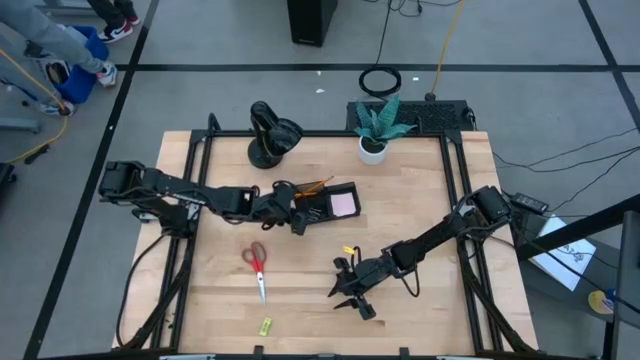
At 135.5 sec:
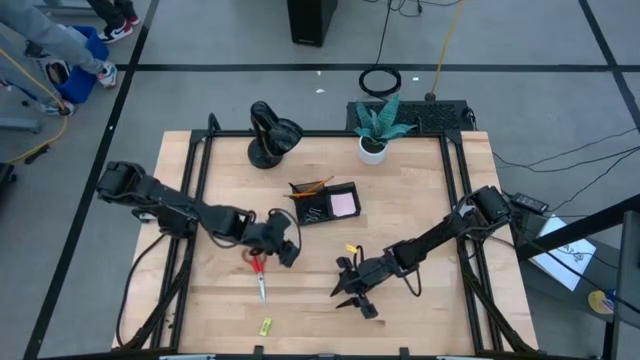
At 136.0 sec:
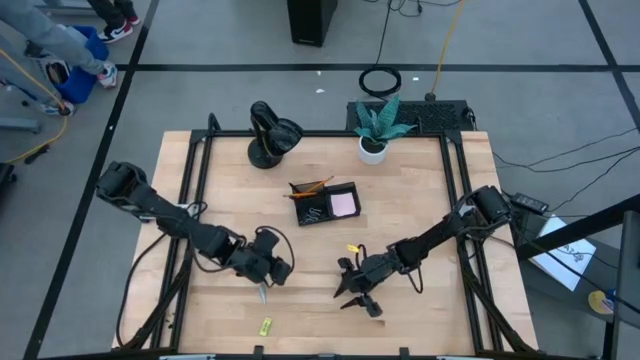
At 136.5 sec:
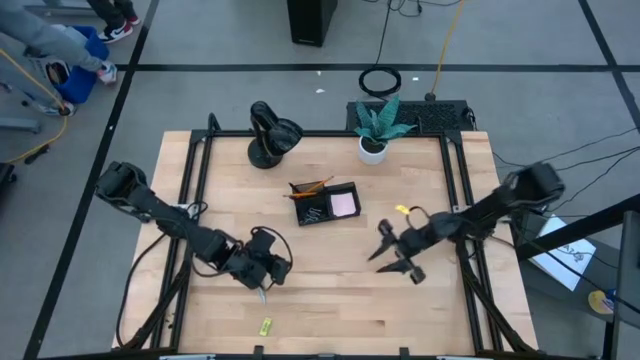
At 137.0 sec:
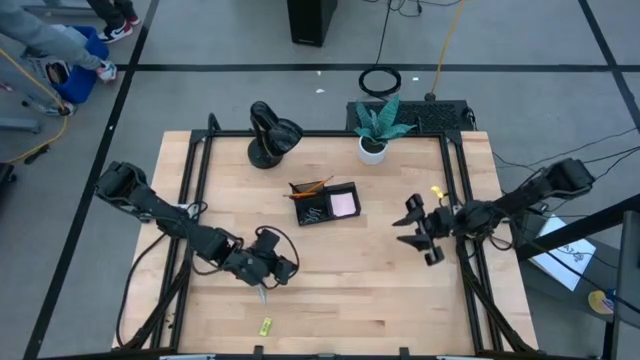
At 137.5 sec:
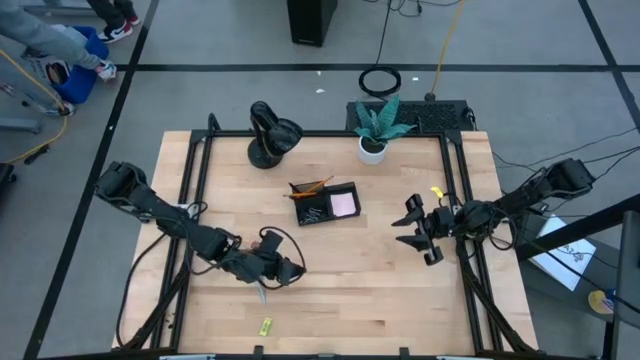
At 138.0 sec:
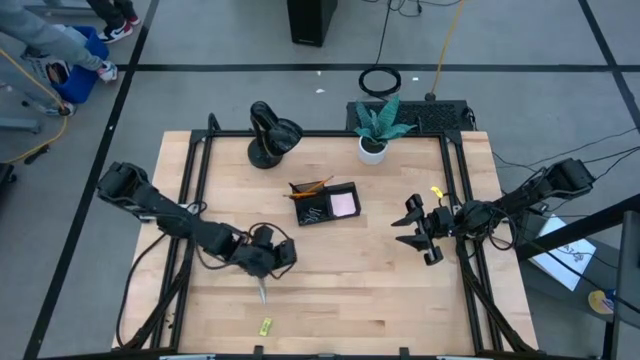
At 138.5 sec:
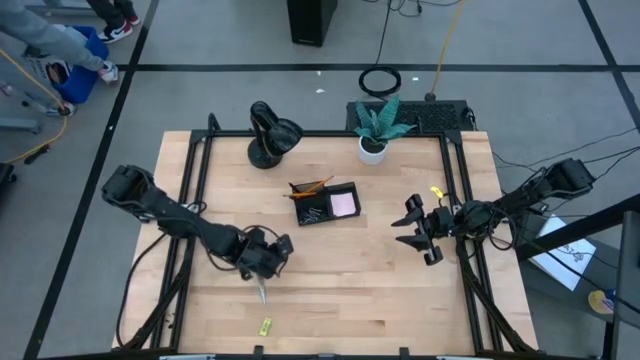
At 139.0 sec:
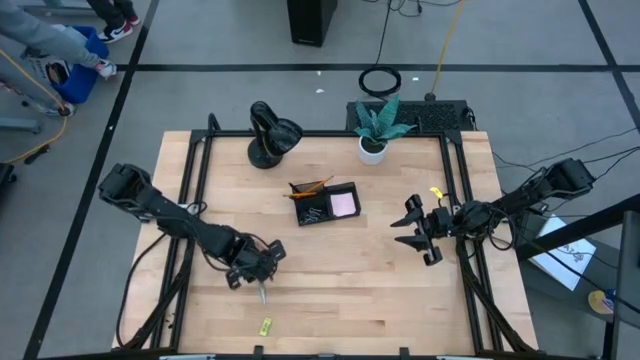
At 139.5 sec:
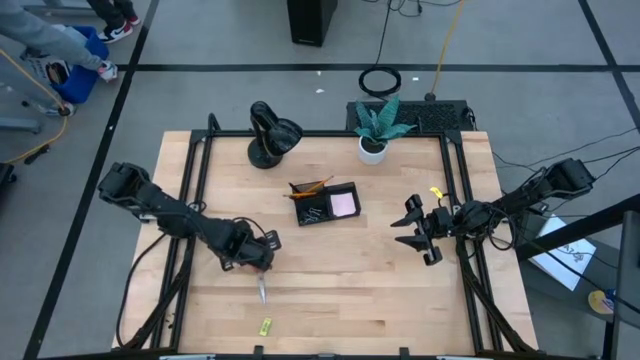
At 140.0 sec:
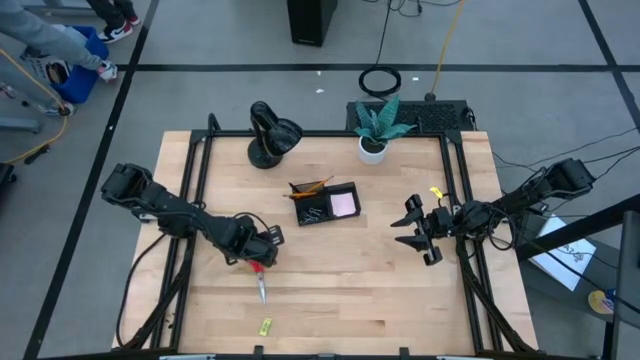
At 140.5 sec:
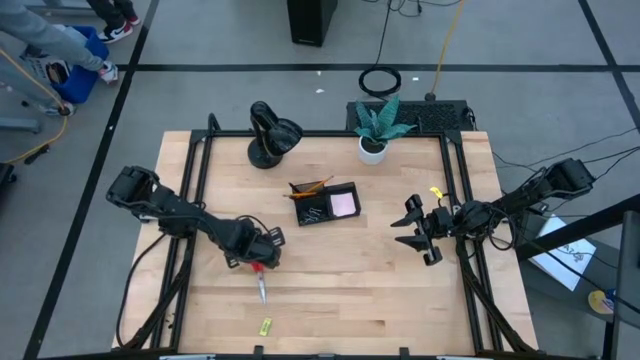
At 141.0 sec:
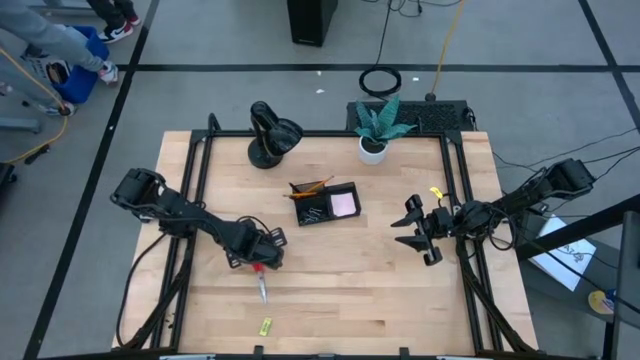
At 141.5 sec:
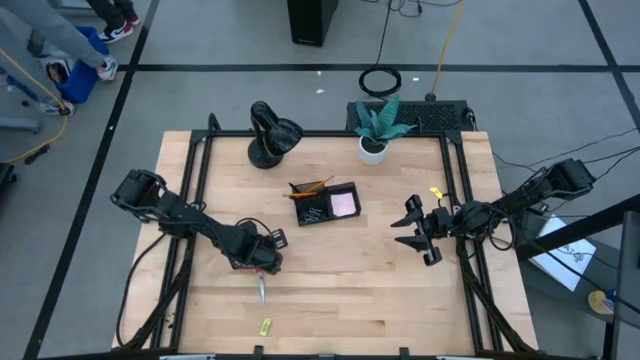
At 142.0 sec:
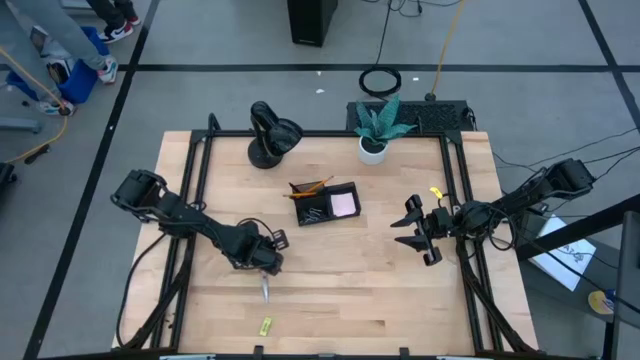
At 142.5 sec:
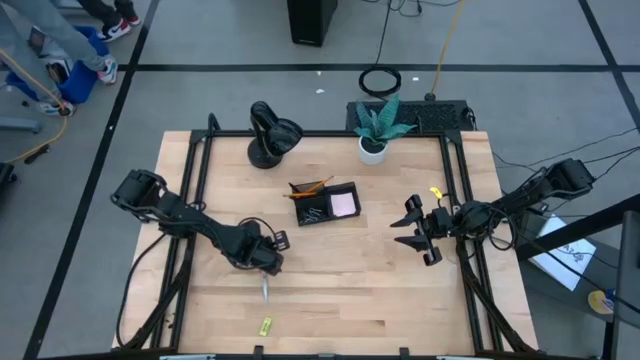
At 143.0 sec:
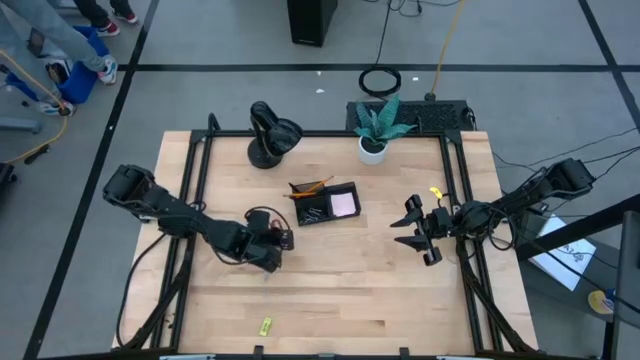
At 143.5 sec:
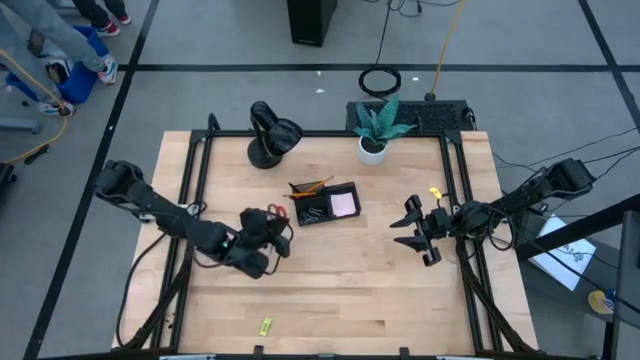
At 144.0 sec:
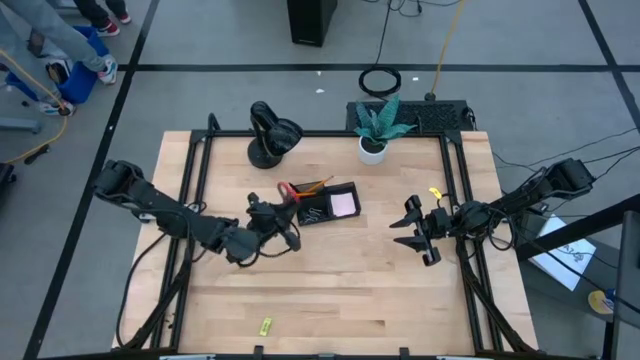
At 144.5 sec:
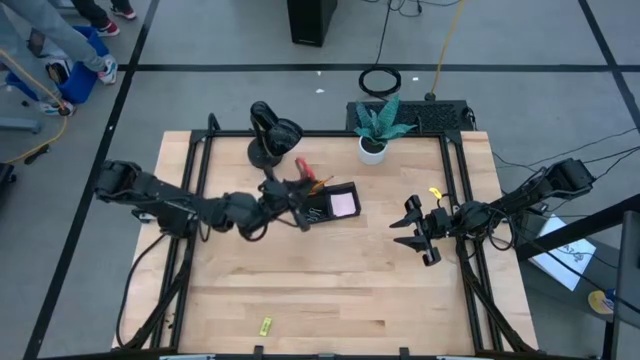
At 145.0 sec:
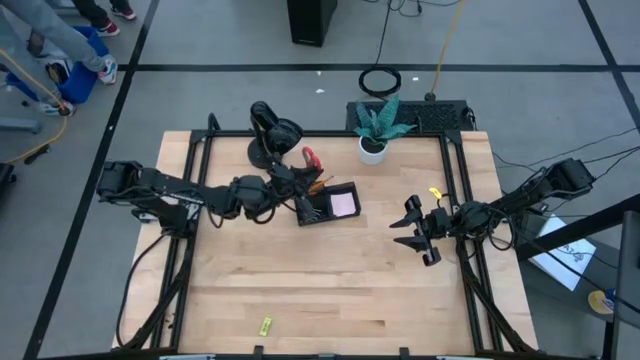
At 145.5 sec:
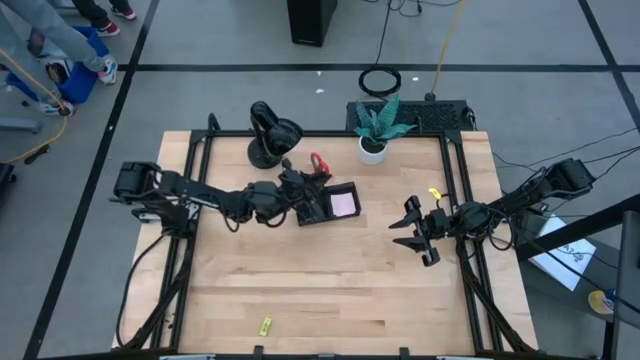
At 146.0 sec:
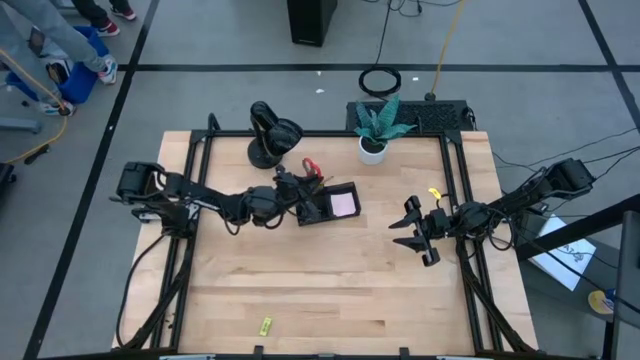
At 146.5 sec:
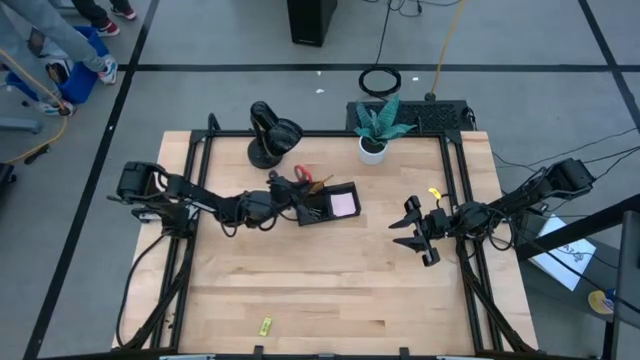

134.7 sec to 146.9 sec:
Task: Pick and place office supplies into organizer
Put the red scissors into the desk organizer

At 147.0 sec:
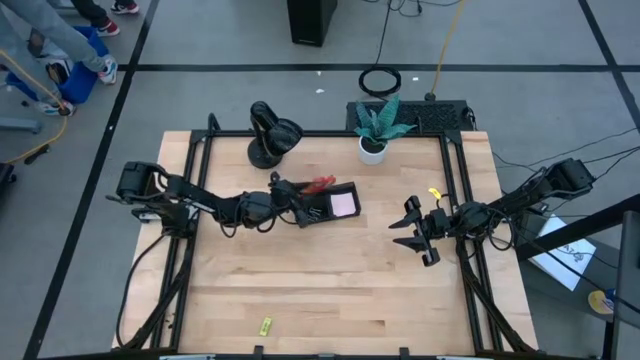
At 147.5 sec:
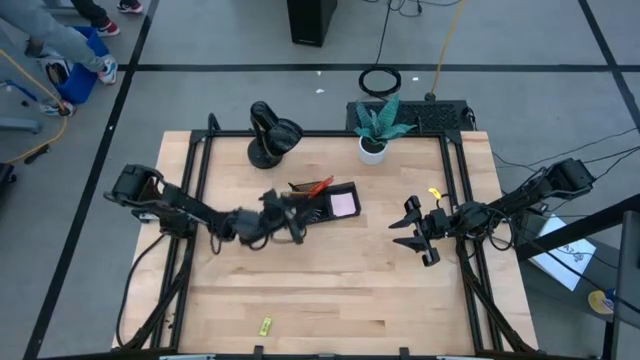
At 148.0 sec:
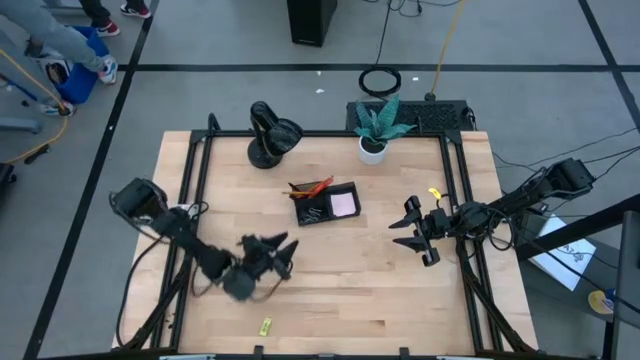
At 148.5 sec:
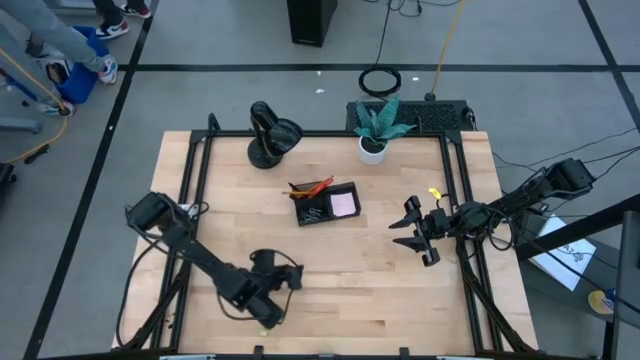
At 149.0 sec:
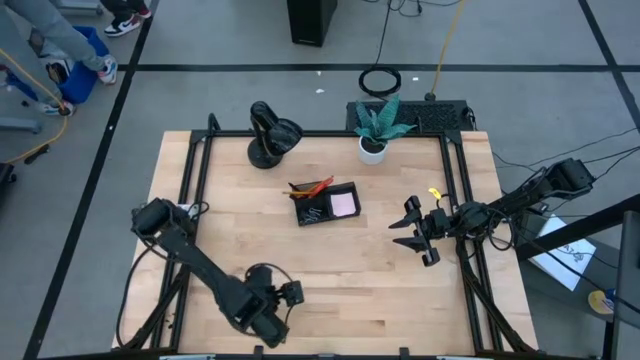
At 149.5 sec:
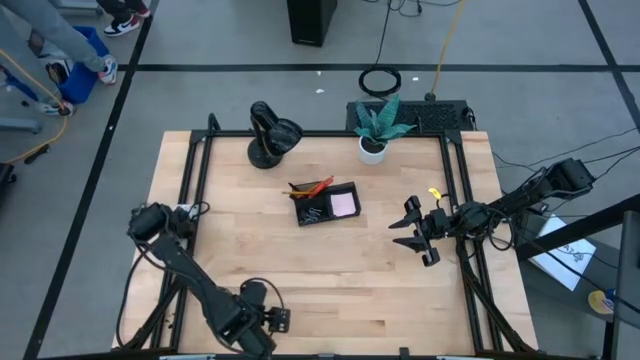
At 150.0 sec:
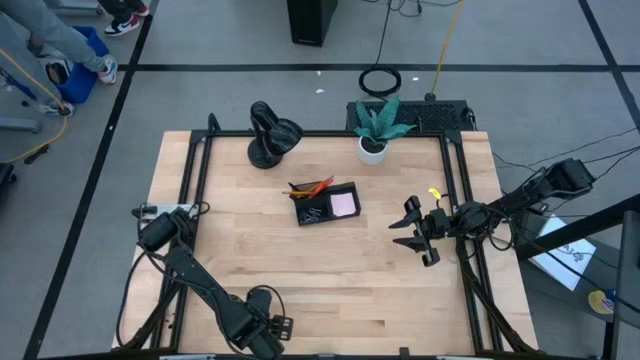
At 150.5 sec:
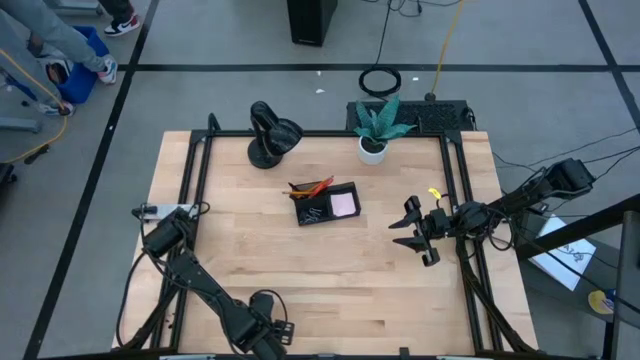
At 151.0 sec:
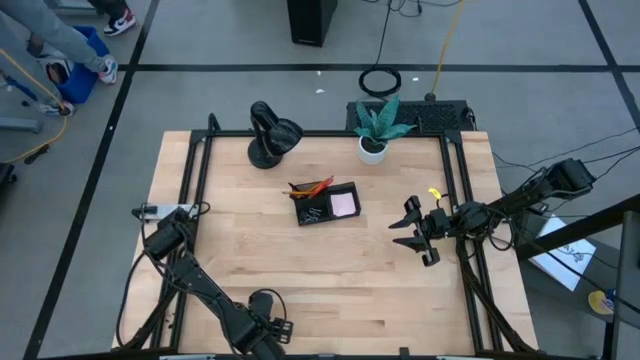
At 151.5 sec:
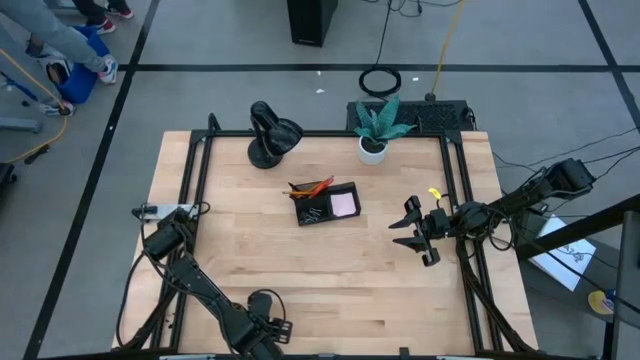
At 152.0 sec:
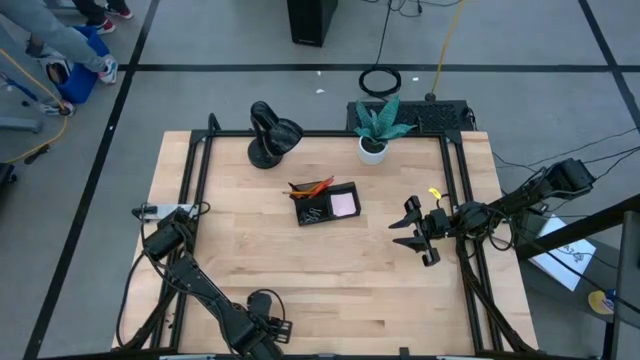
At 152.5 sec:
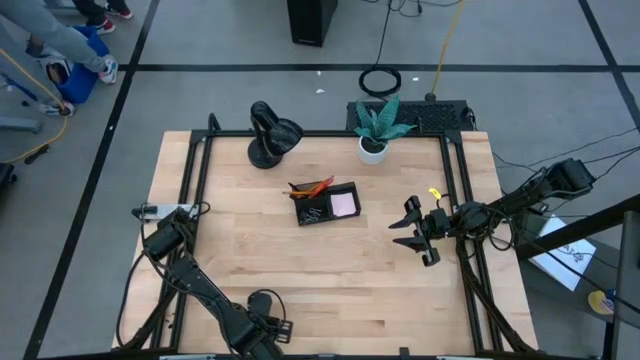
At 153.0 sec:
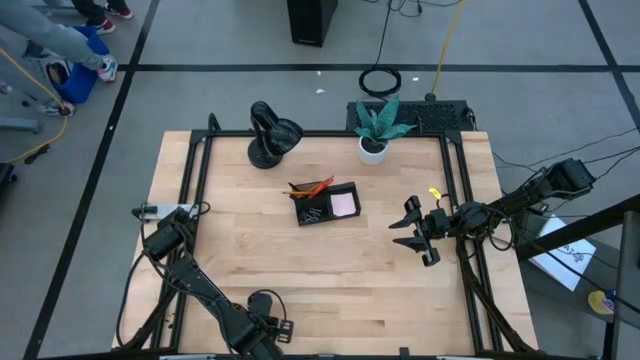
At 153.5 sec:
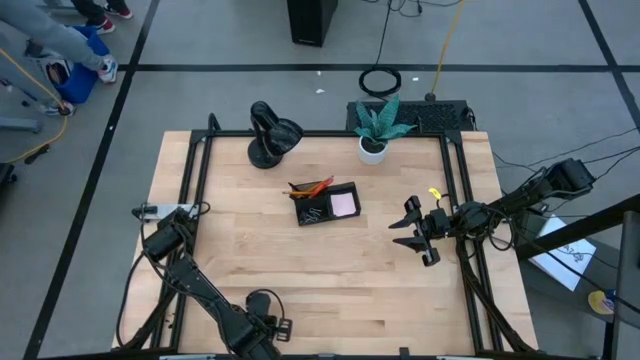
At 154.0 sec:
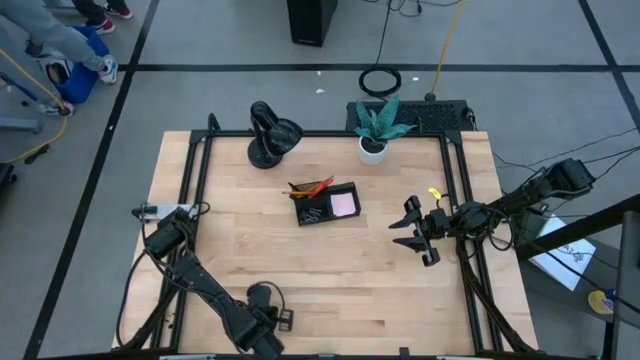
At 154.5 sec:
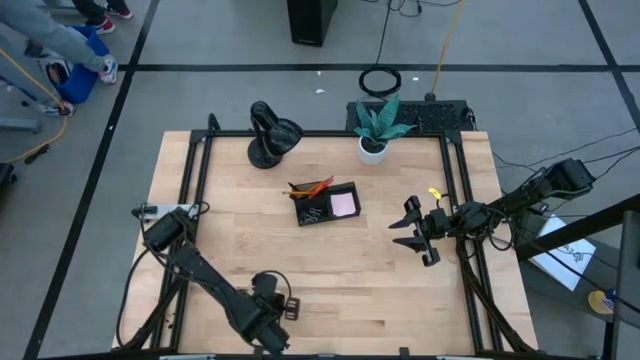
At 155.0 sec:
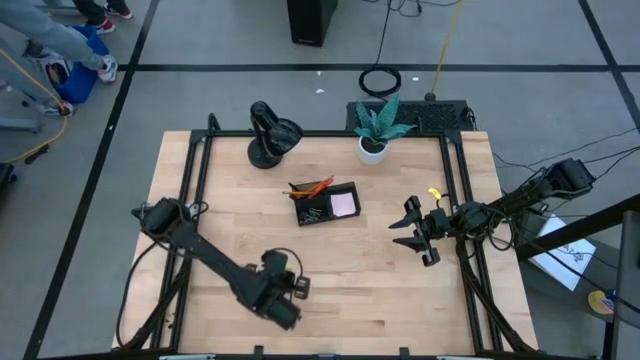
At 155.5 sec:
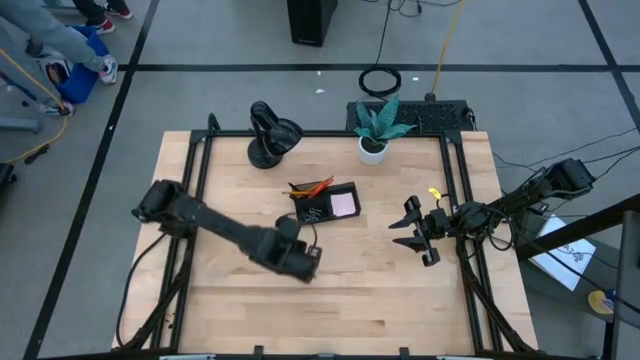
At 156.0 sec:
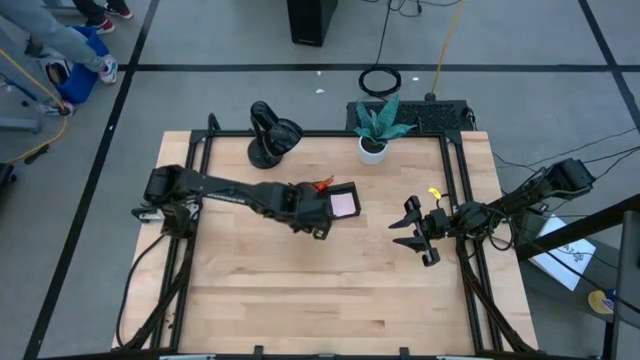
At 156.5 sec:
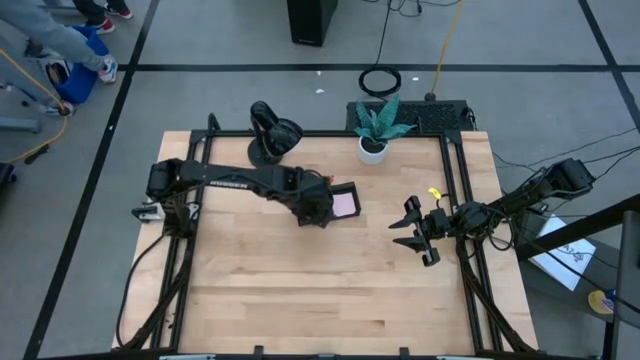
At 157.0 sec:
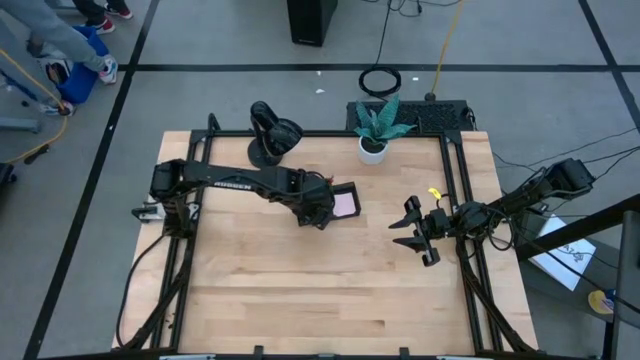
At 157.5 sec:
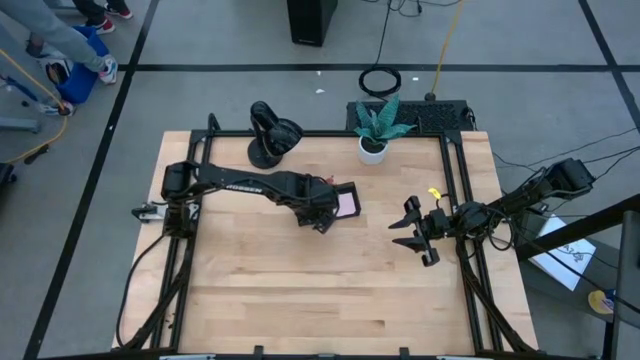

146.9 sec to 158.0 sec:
Put the green eraser into the desk organizer
